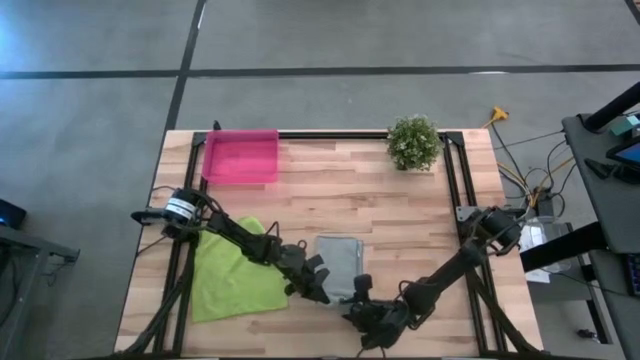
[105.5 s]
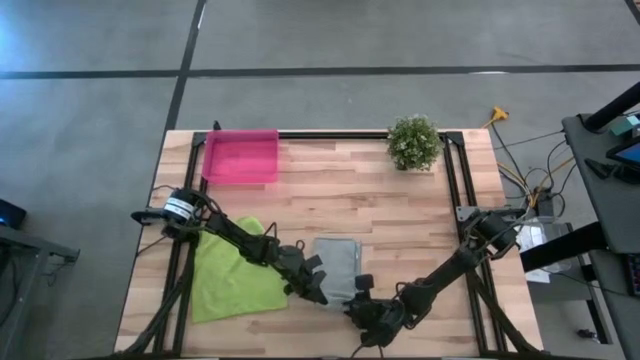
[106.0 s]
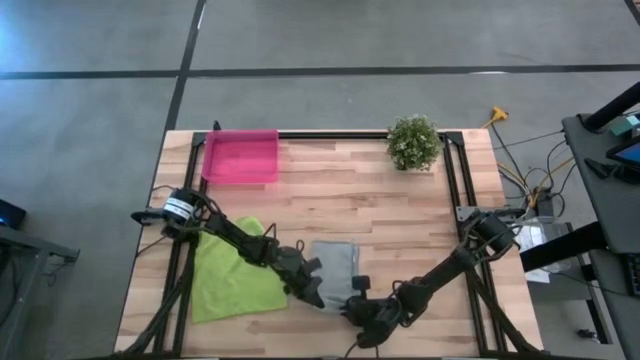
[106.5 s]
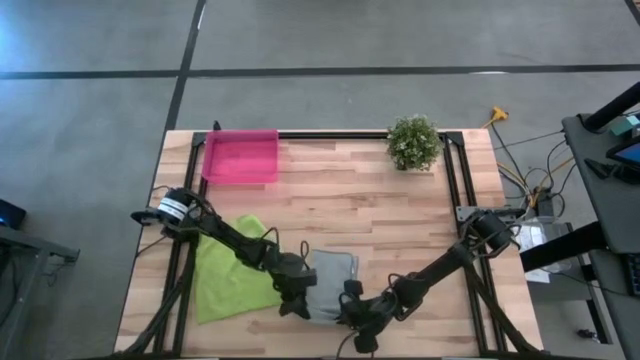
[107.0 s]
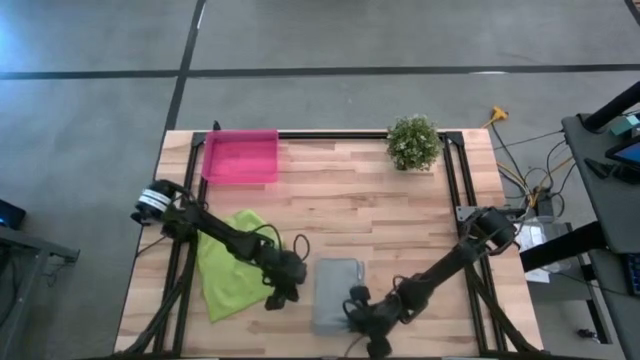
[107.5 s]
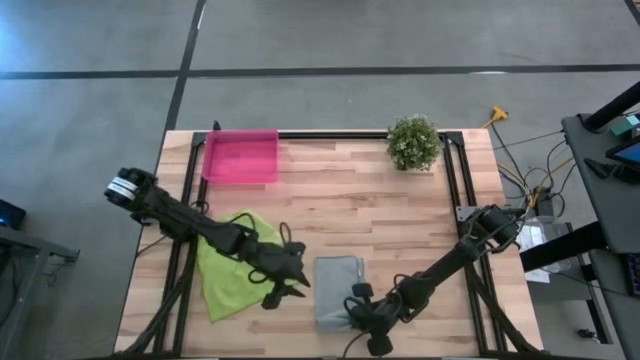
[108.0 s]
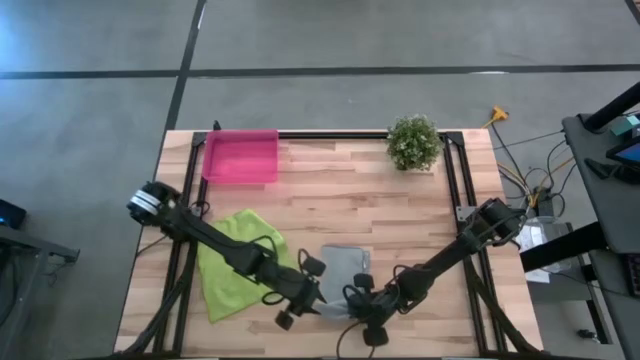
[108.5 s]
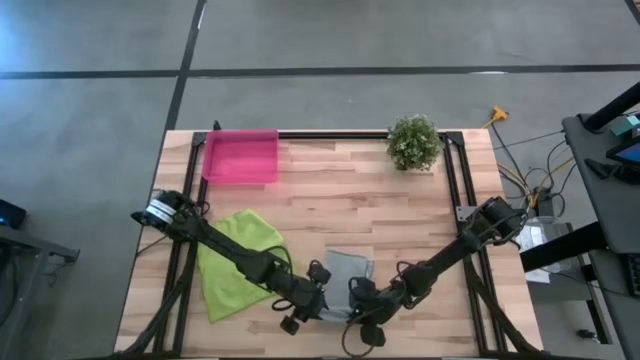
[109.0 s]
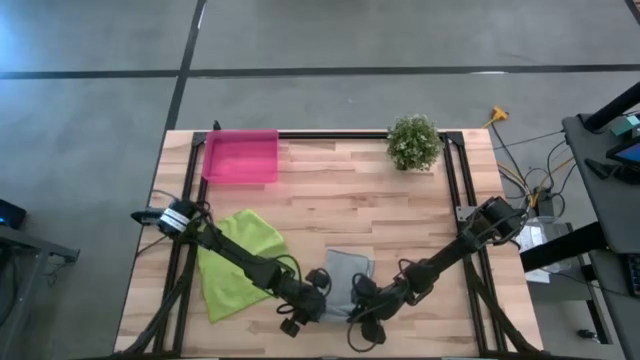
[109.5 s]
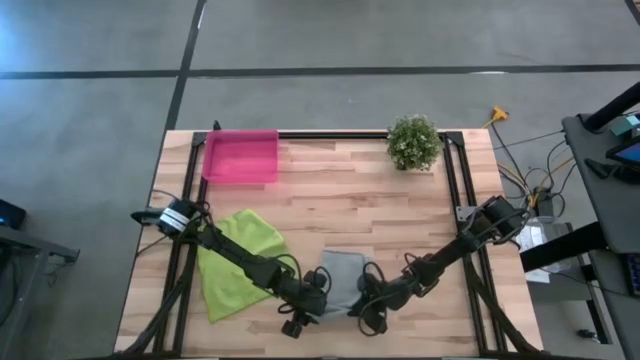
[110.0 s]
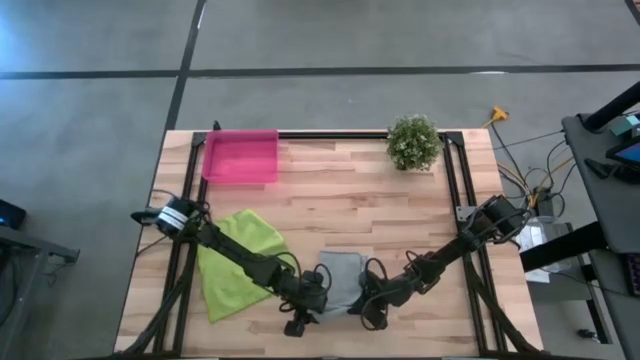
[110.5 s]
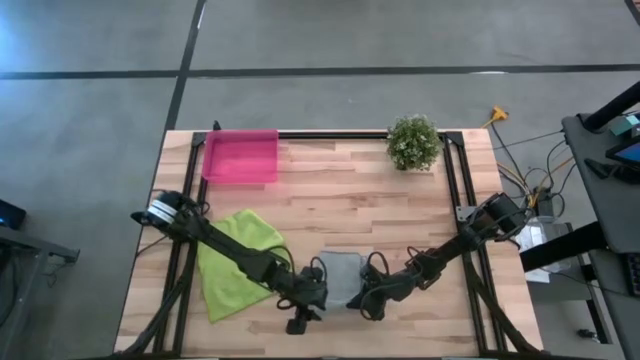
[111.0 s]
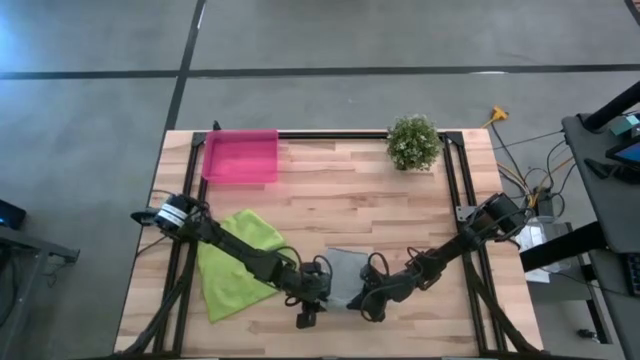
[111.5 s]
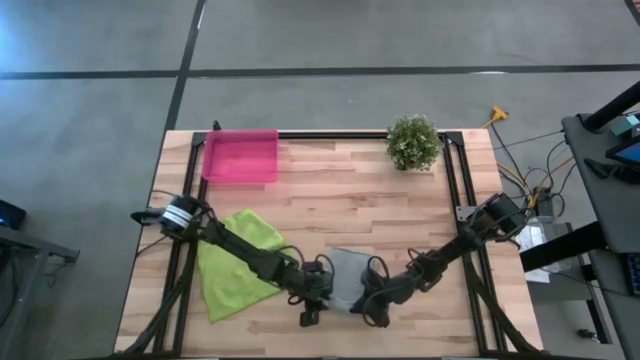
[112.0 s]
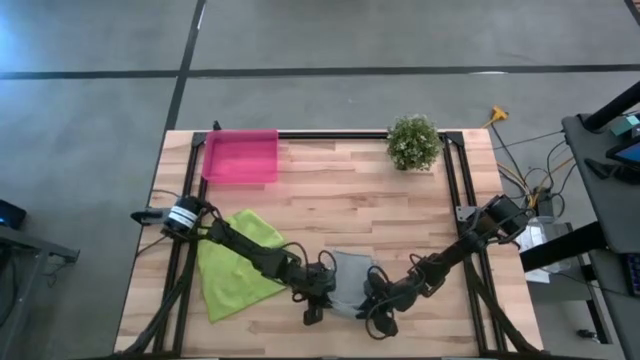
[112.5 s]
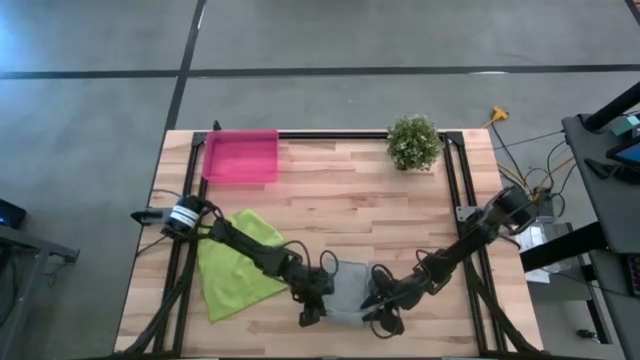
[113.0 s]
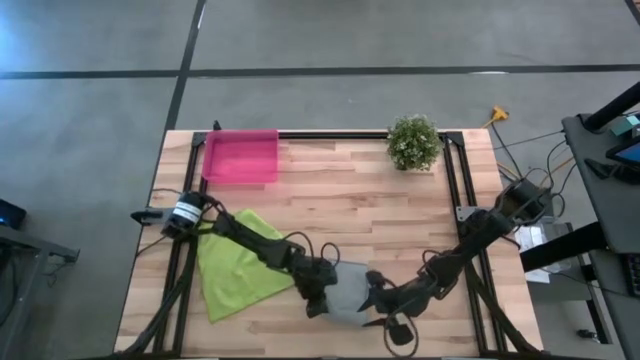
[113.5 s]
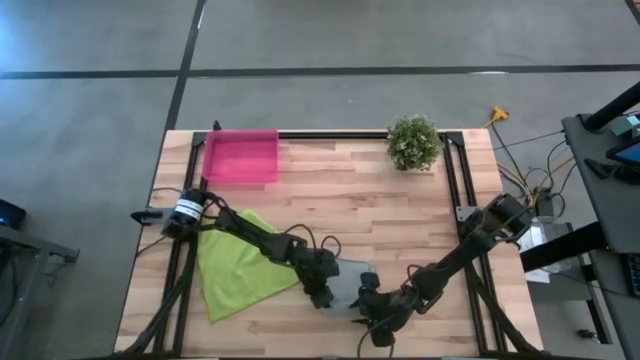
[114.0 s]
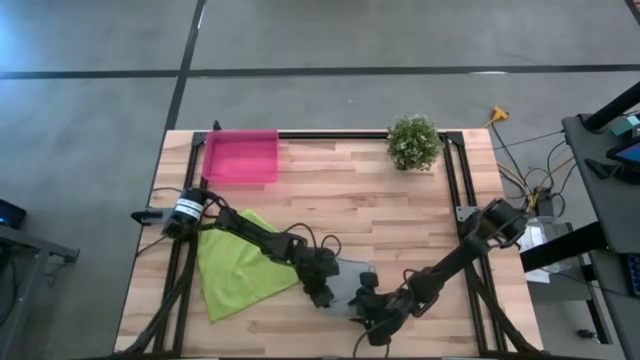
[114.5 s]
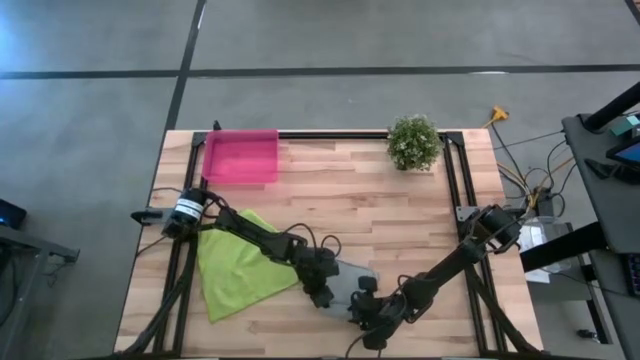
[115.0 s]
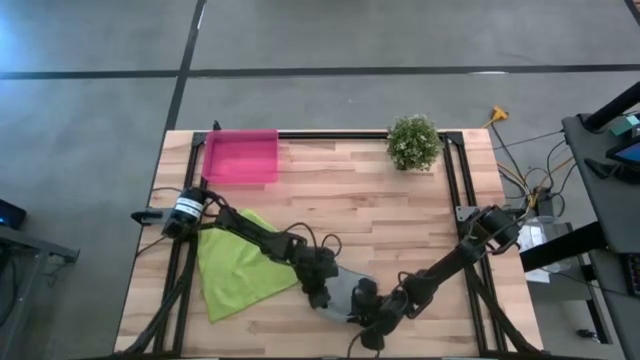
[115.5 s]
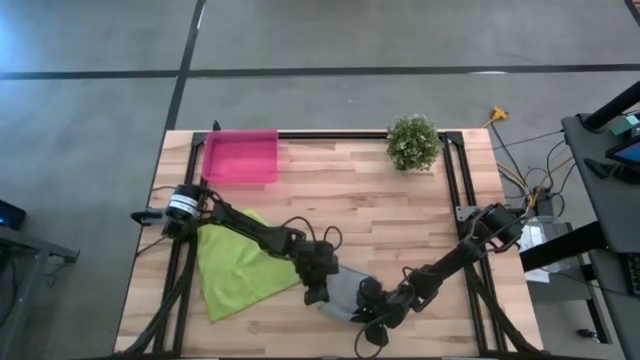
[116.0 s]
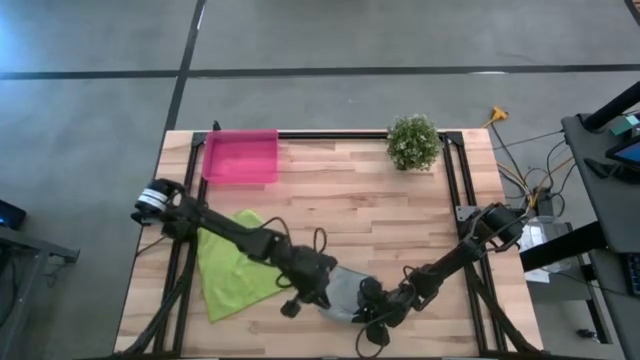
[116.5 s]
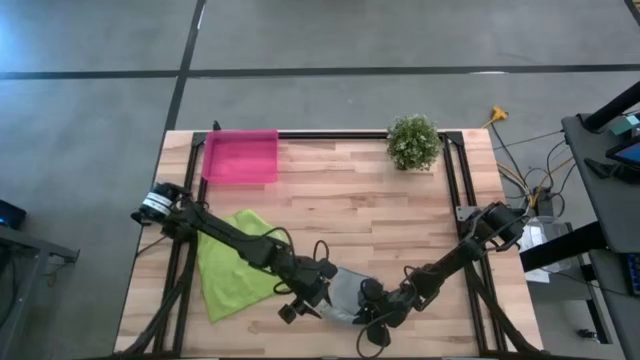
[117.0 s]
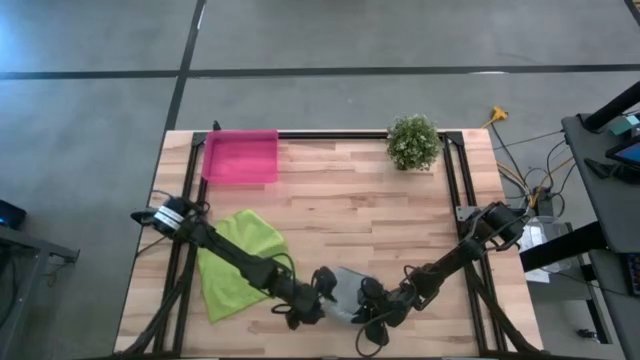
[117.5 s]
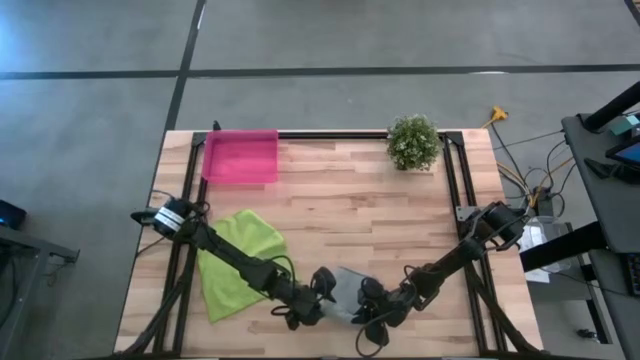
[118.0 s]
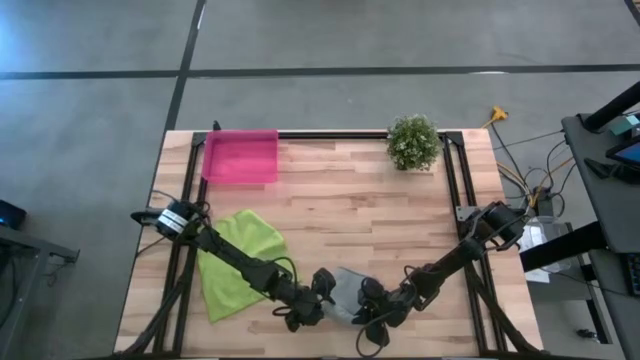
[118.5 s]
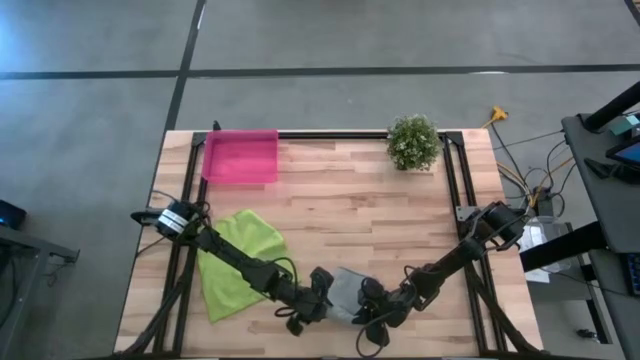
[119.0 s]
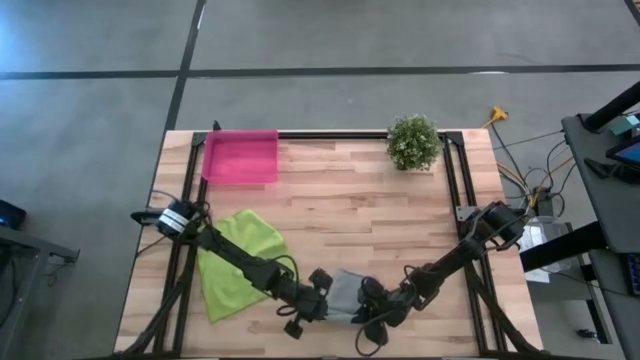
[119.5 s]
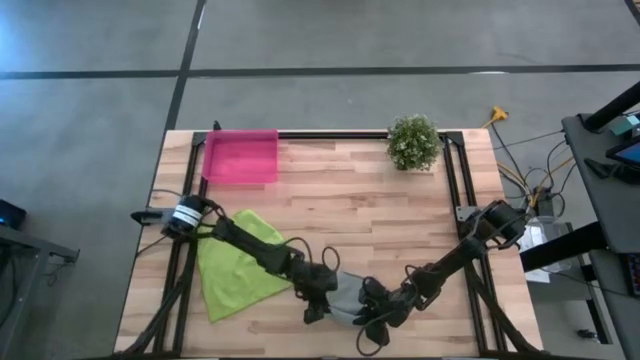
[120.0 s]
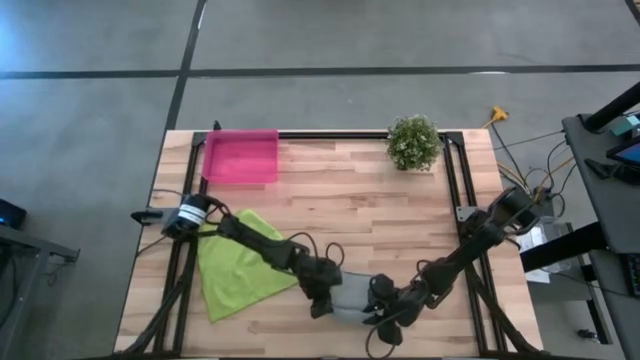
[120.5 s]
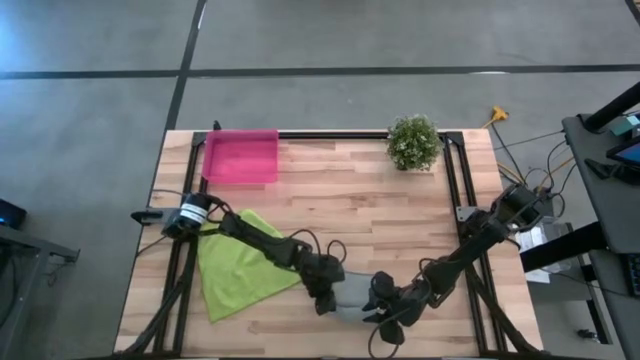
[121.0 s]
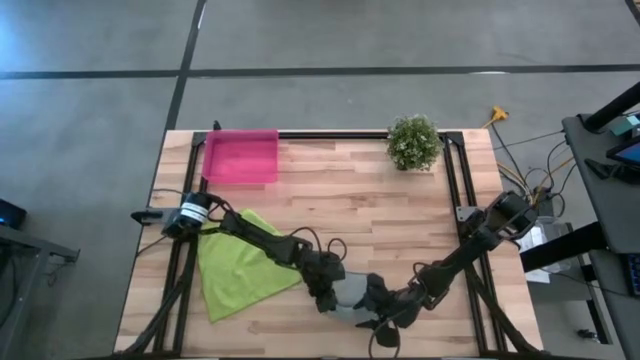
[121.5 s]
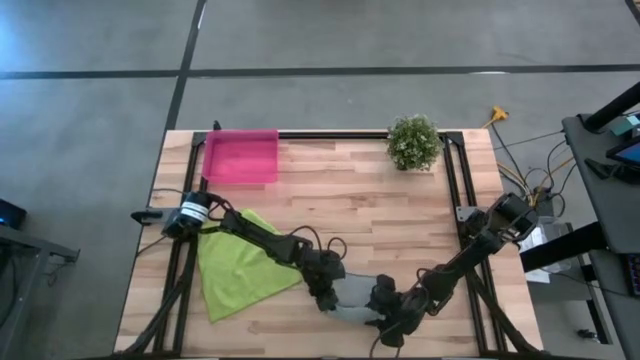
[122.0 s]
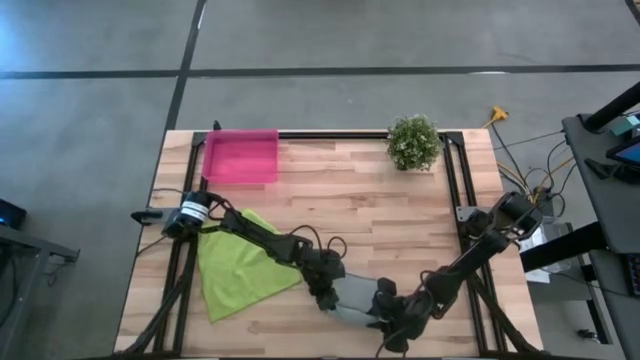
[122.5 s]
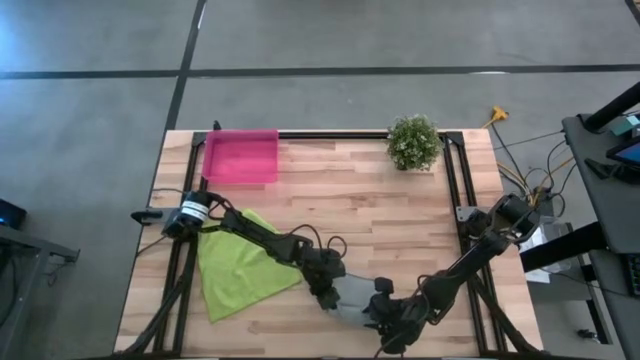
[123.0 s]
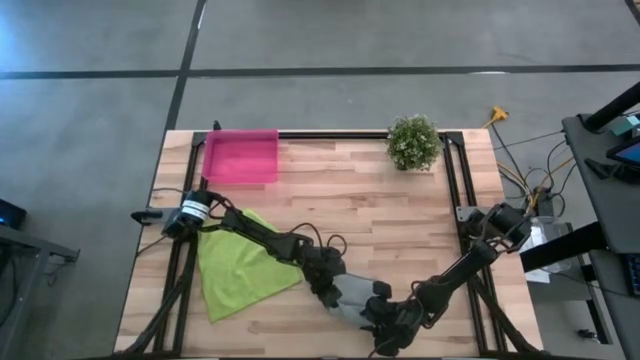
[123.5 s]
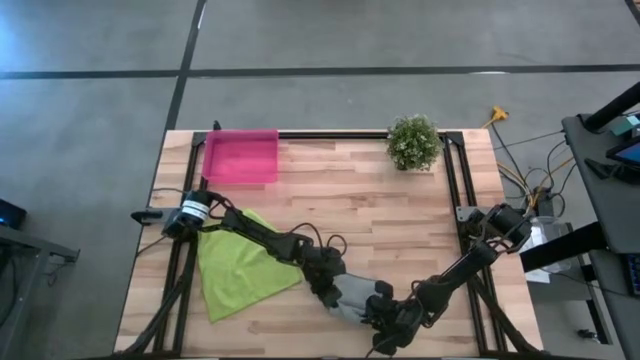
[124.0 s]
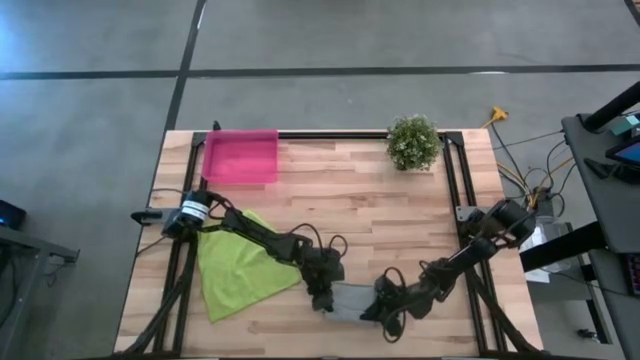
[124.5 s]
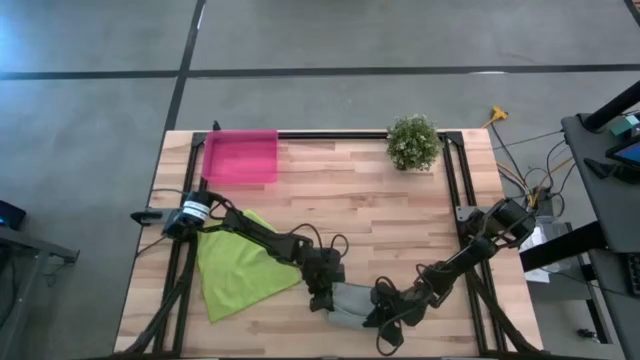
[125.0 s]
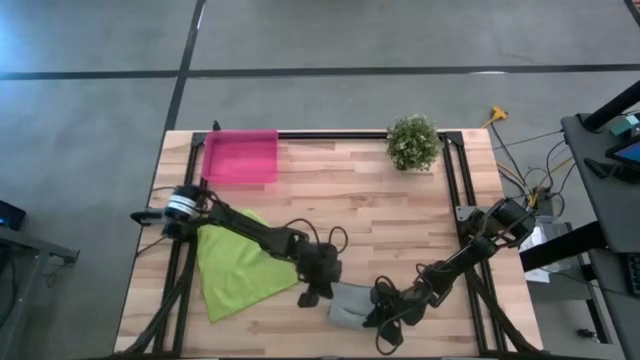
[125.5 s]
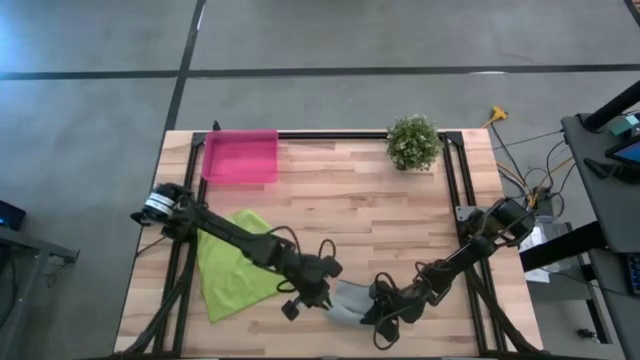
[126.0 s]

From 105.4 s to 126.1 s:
Task: Roll microfiber towels into tight, uniform cylinder then place into a basket
Roll the blue microfiber cloth
